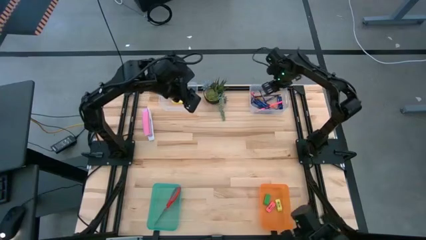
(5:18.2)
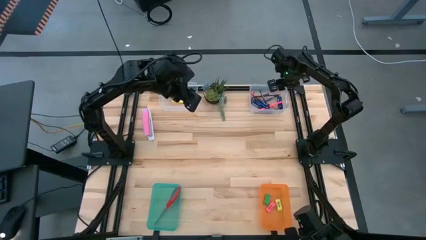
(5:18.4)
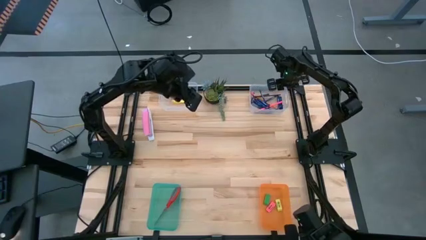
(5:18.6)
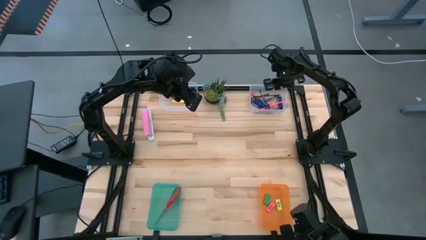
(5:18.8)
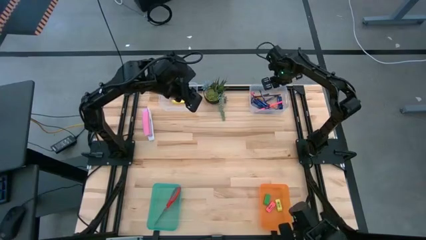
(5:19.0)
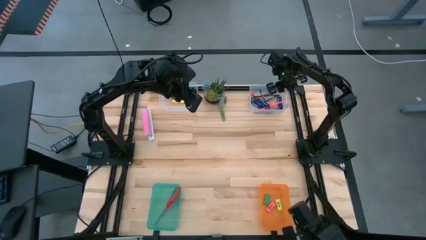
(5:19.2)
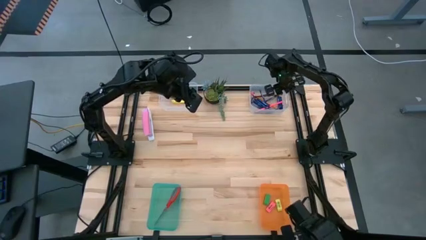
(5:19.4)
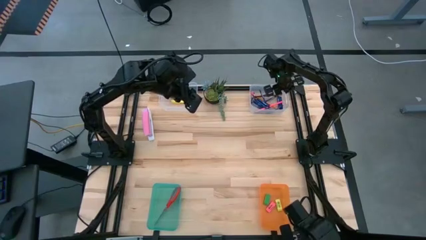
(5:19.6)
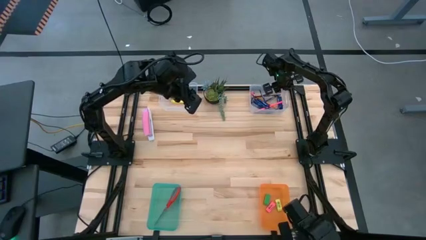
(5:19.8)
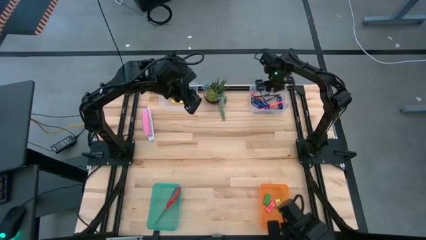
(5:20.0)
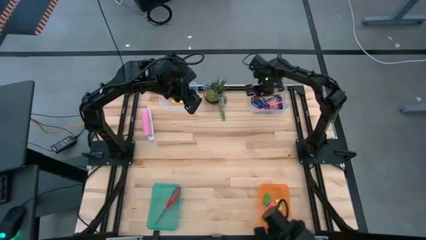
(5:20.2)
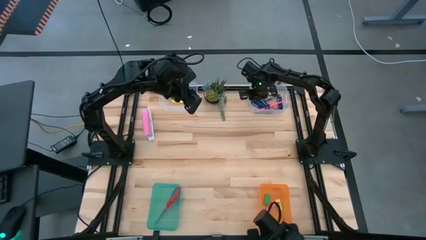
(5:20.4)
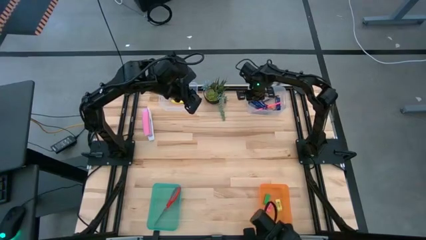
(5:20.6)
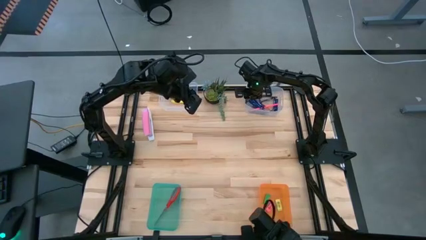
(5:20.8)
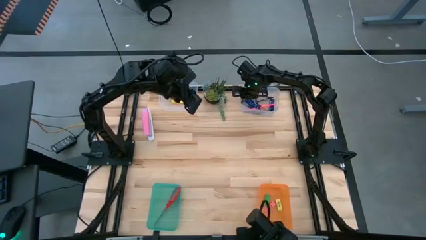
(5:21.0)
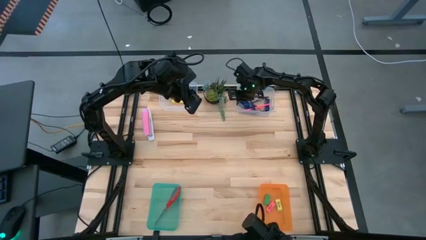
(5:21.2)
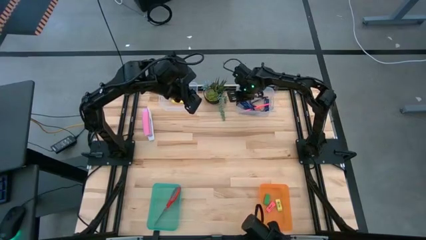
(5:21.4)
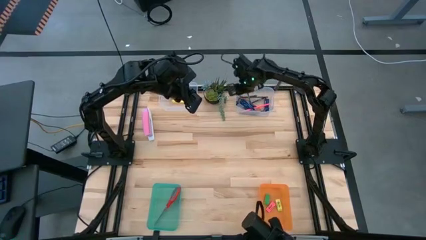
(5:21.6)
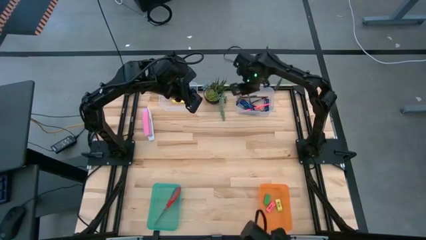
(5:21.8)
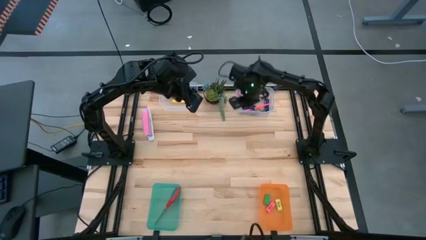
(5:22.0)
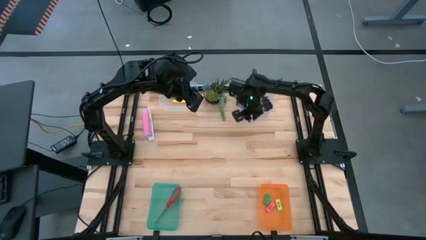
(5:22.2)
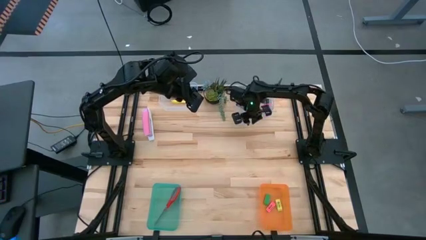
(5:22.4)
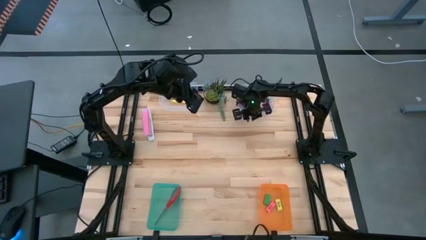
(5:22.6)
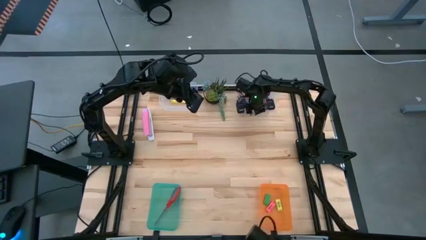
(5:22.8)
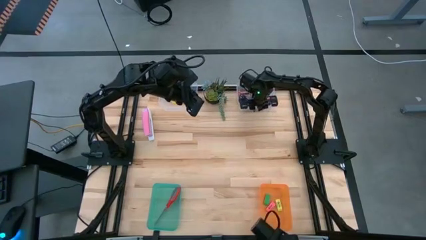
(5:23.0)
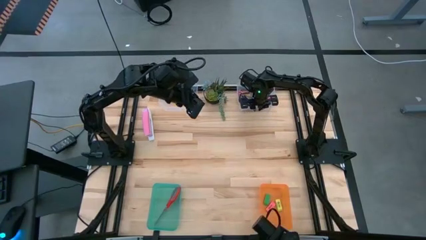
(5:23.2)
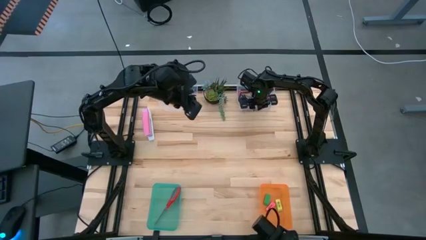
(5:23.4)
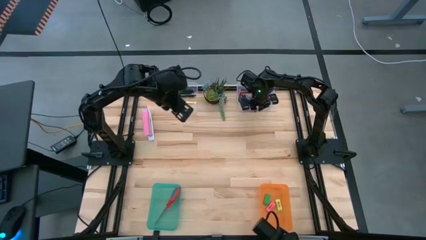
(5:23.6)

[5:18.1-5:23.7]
Task: Sort crayons/erasers/pens/pencils in bins
Adjust the right transparent bin

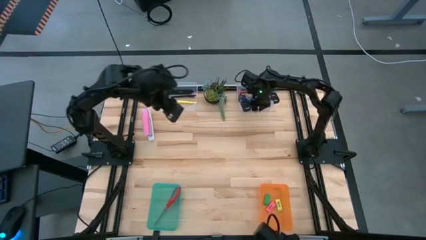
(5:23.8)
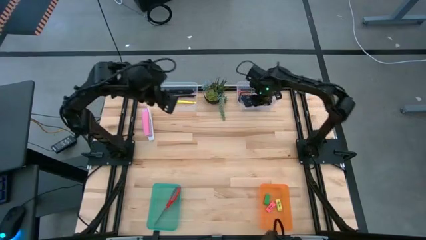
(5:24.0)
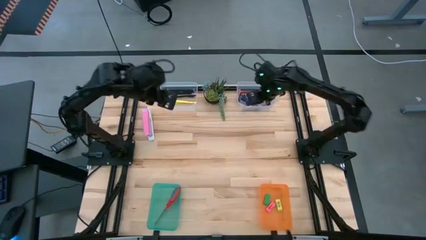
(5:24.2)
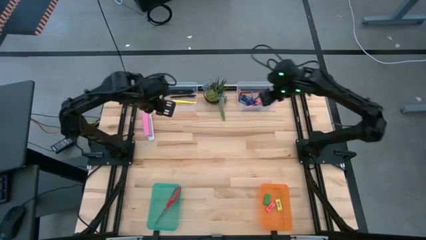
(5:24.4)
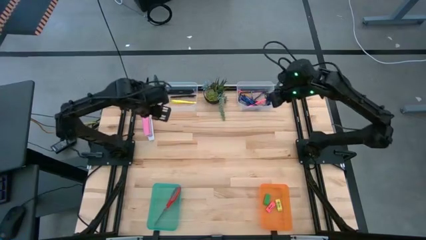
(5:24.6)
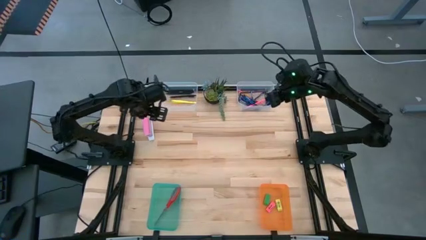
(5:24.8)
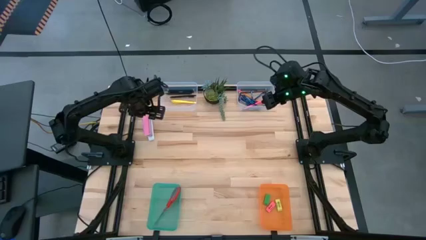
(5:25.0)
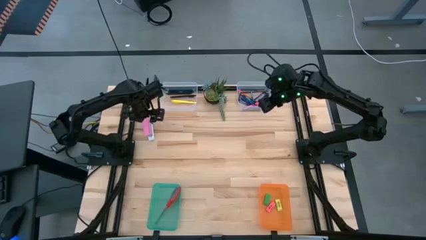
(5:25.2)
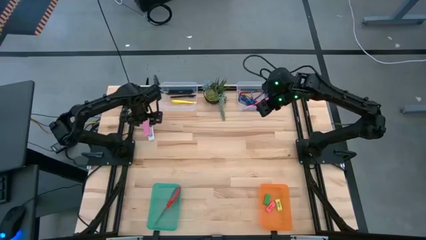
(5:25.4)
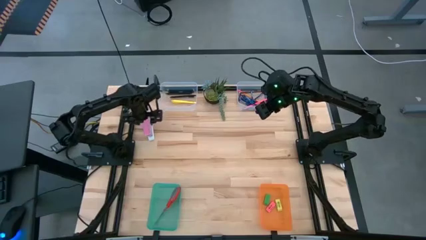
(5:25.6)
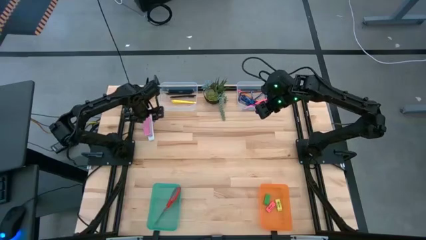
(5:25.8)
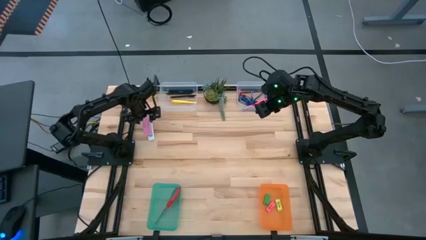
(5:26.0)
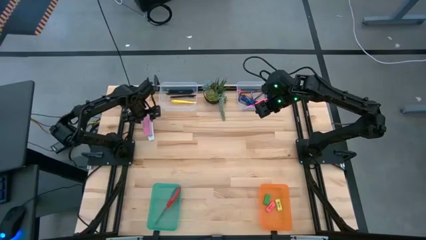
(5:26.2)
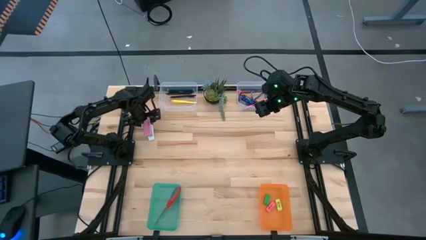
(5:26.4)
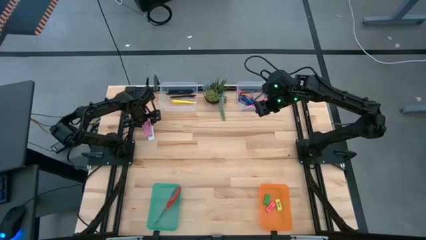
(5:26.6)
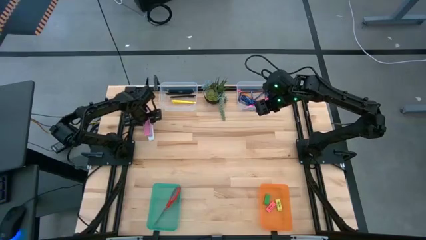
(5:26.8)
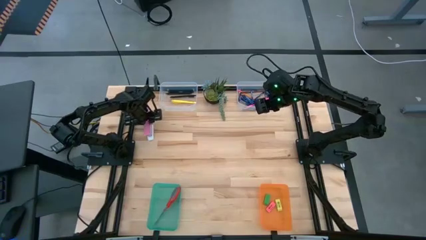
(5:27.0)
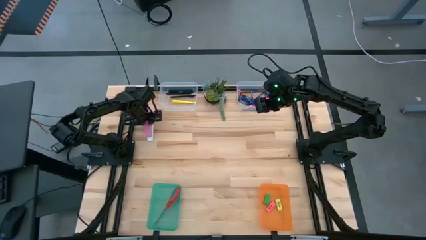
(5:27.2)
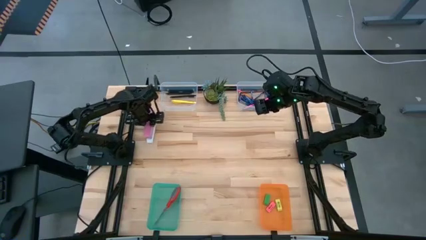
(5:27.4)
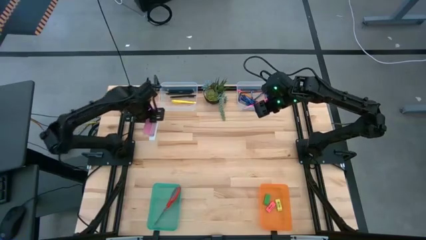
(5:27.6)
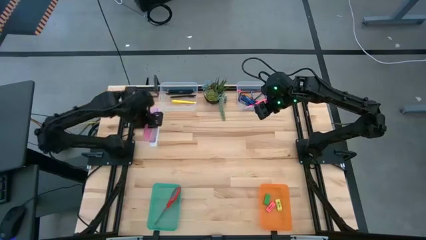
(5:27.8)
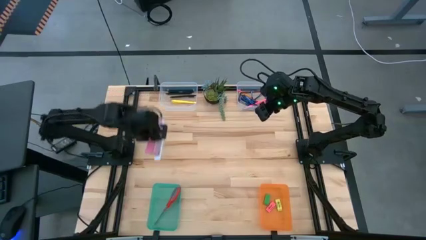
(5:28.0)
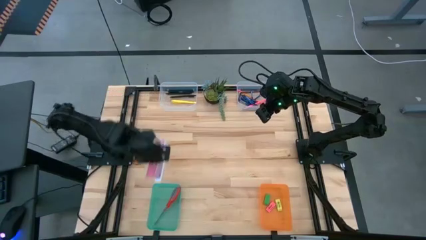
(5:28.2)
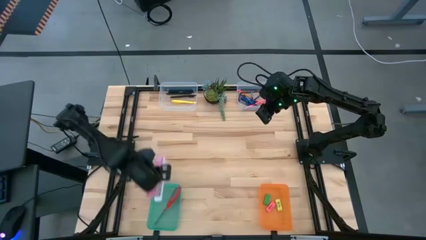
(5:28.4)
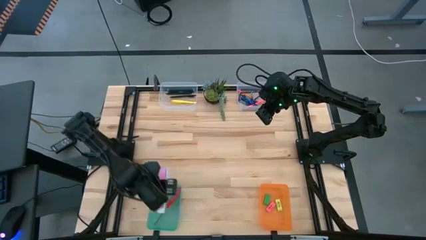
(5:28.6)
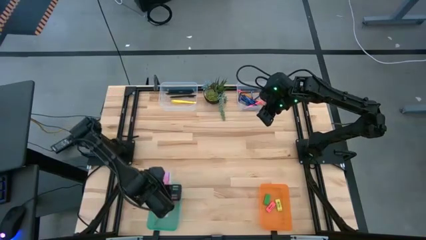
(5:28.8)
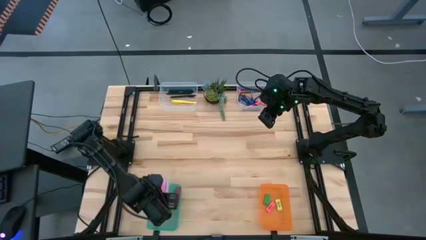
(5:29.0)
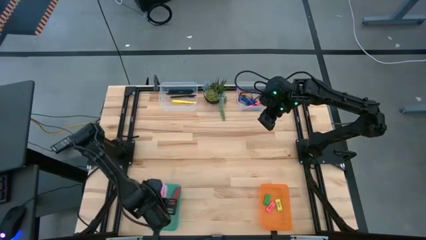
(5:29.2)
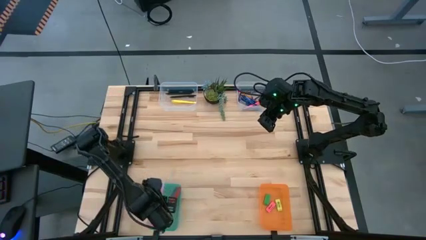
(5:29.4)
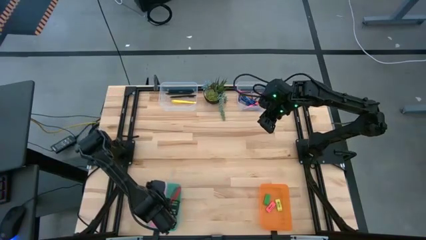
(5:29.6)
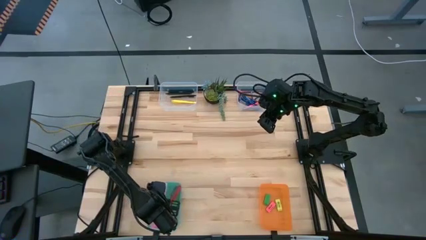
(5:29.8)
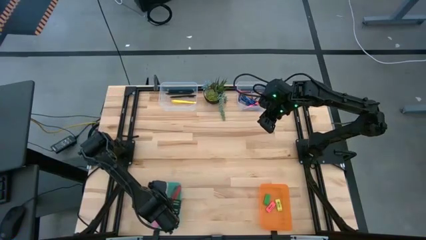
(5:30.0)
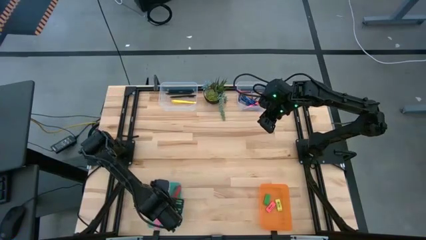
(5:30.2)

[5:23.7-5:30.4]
Put the pink stapler into the green bin

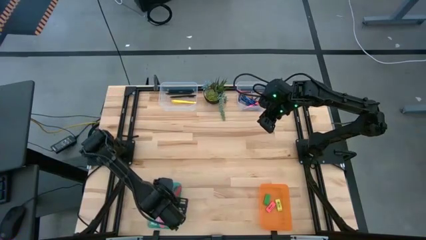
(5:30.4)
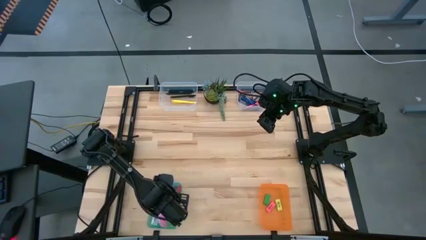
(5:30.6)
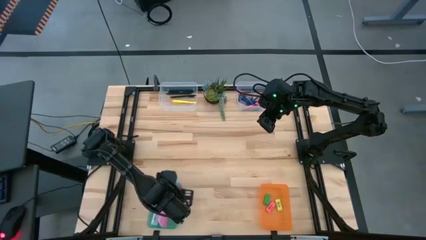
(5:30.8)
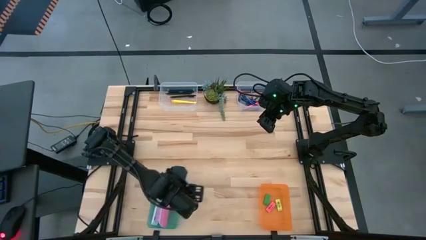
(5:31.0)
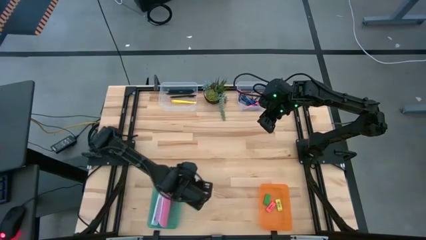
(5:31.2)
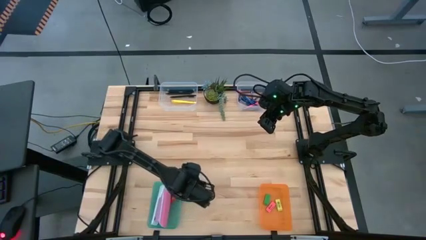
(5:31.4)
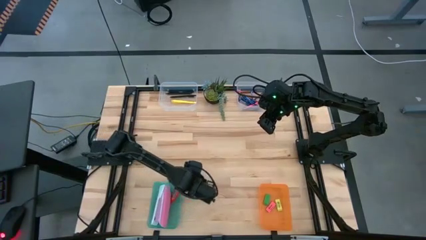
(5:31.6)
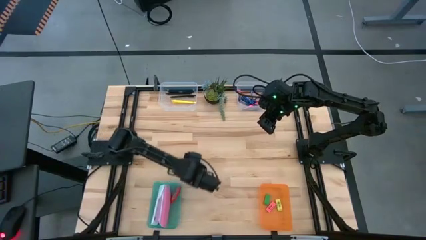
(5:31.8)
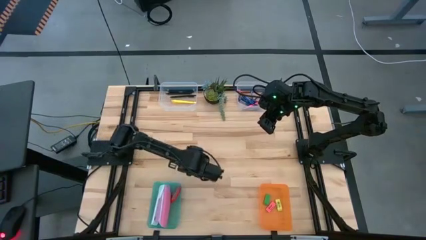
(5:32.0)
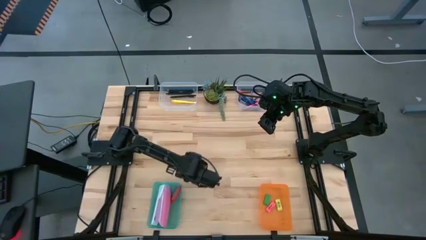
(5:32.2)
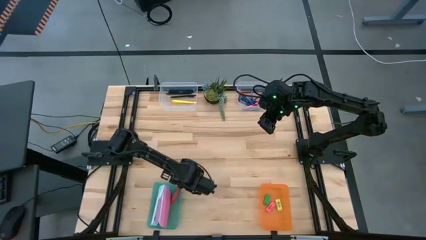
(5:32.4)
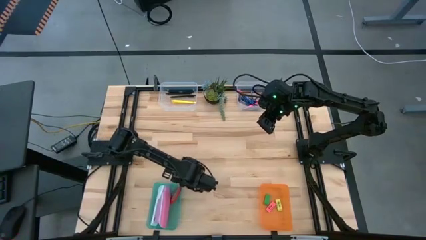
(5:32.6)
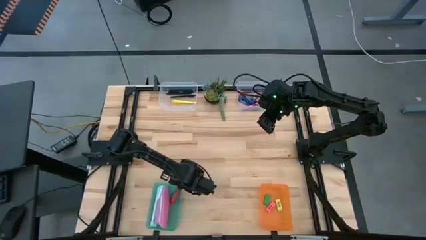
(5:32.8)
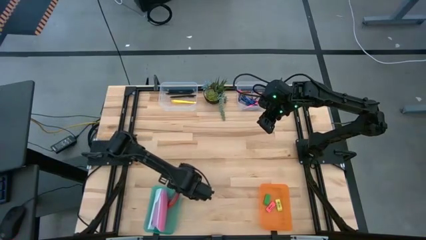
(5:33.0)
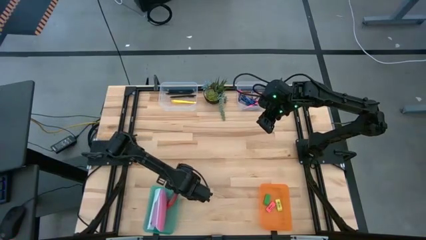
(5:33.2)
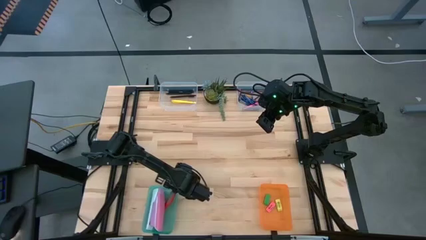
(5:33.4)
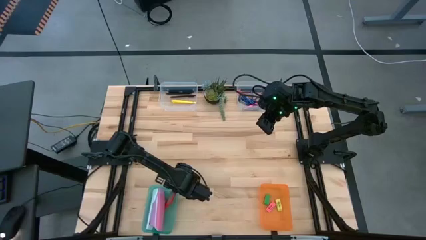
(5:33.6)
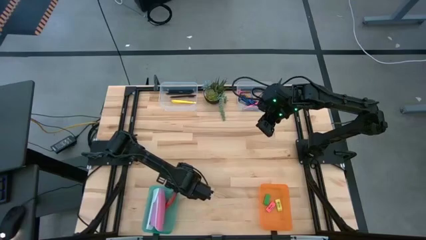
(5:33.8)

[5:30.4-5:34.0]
Adjust the green bin
